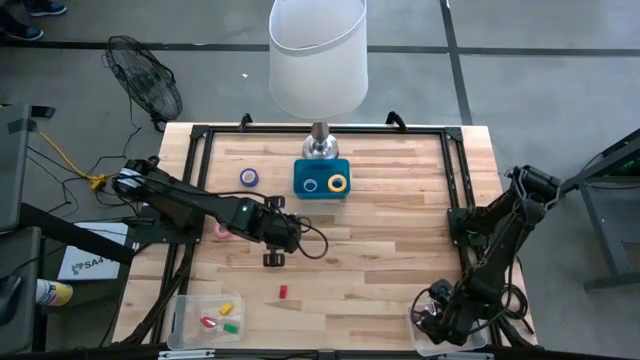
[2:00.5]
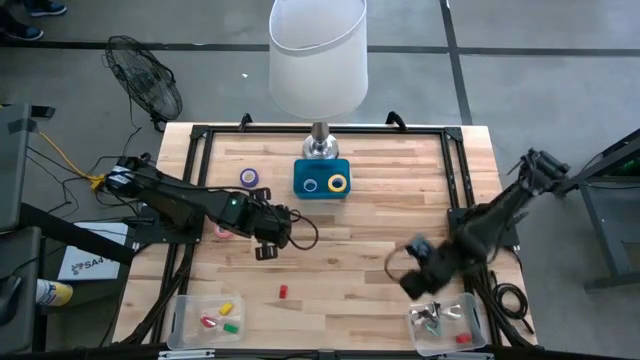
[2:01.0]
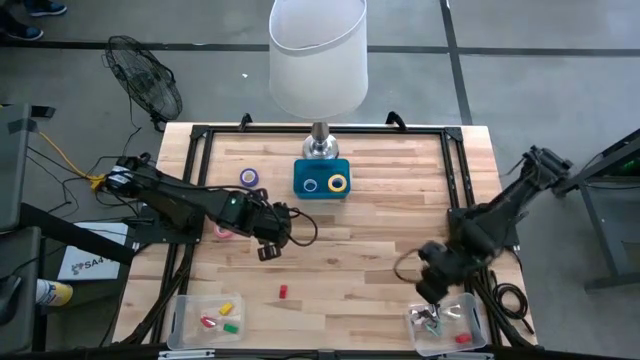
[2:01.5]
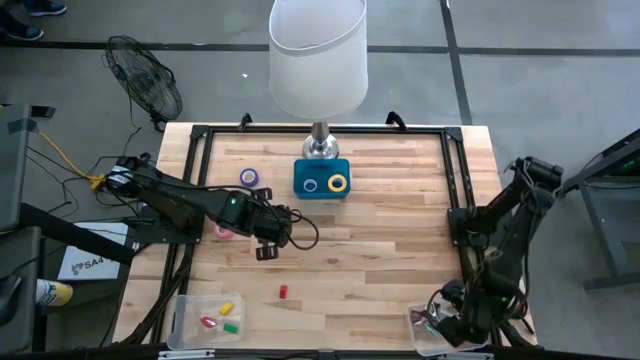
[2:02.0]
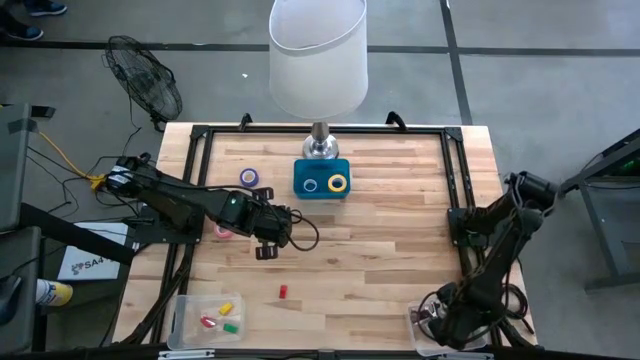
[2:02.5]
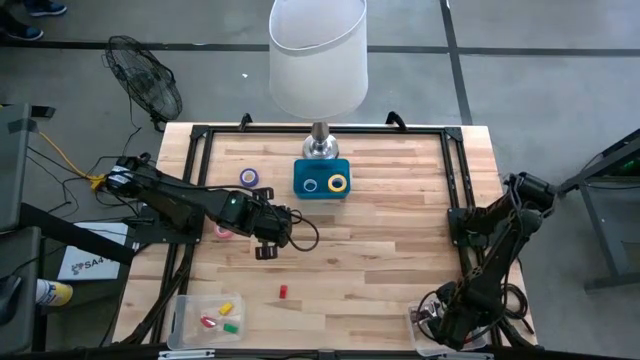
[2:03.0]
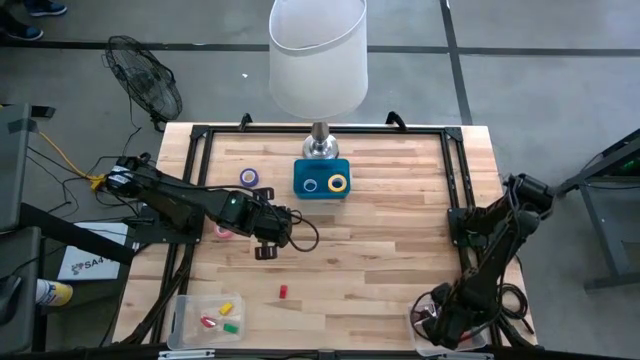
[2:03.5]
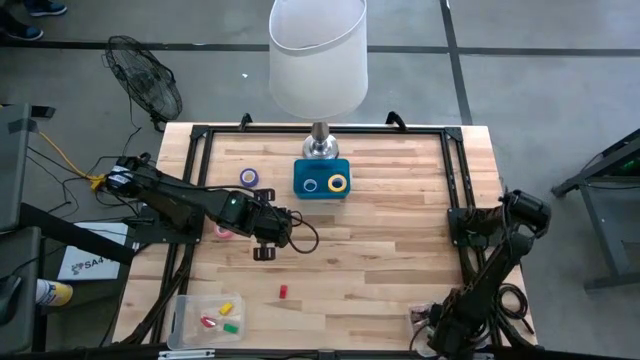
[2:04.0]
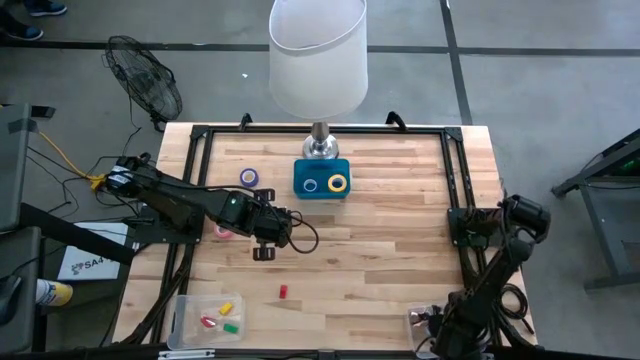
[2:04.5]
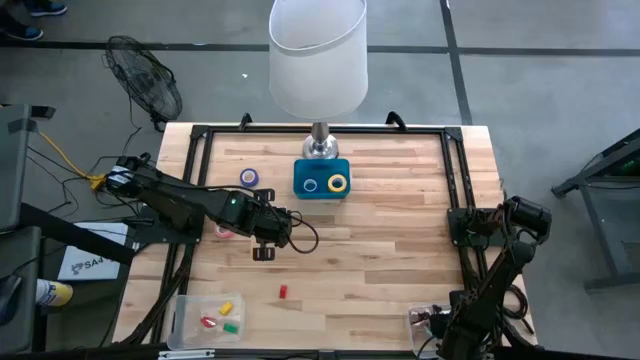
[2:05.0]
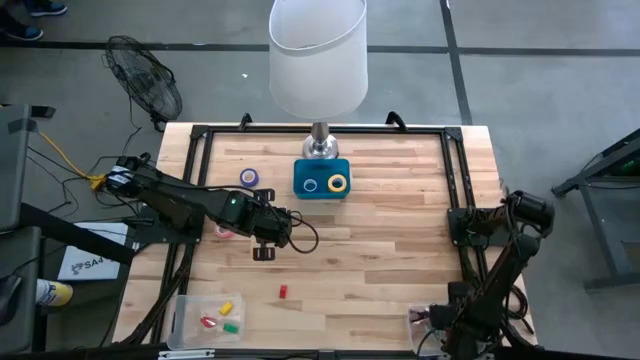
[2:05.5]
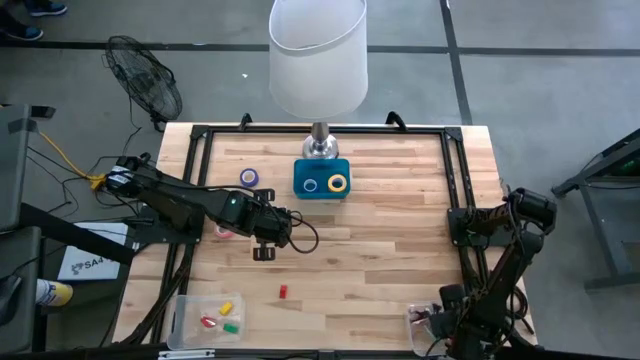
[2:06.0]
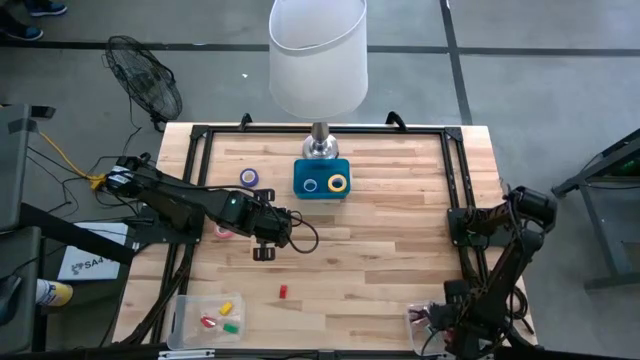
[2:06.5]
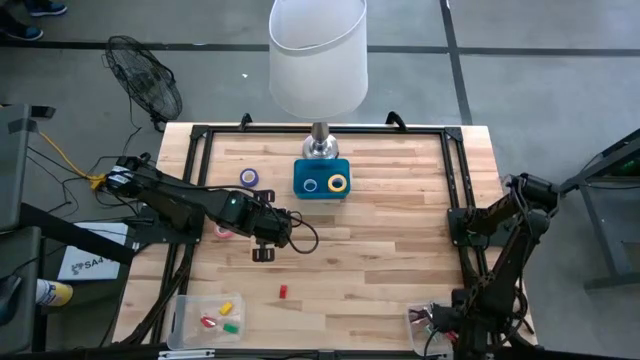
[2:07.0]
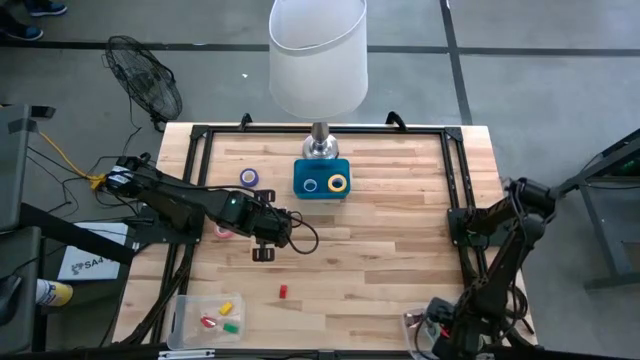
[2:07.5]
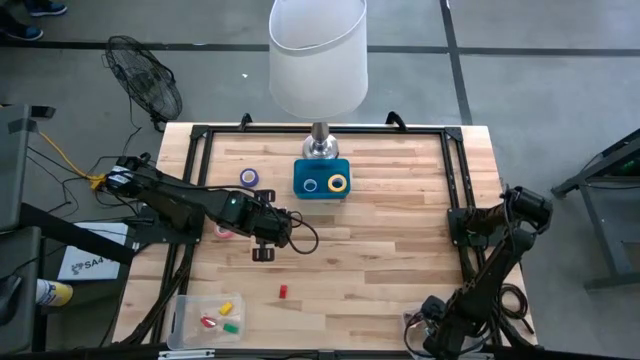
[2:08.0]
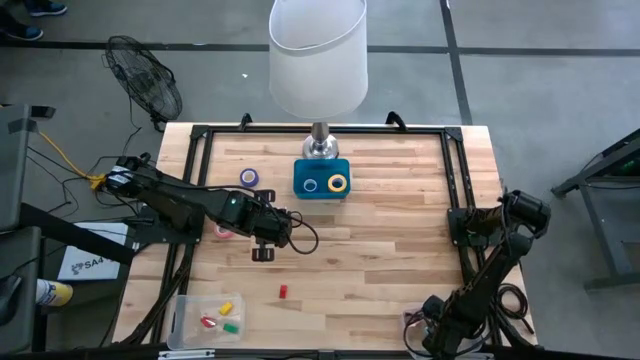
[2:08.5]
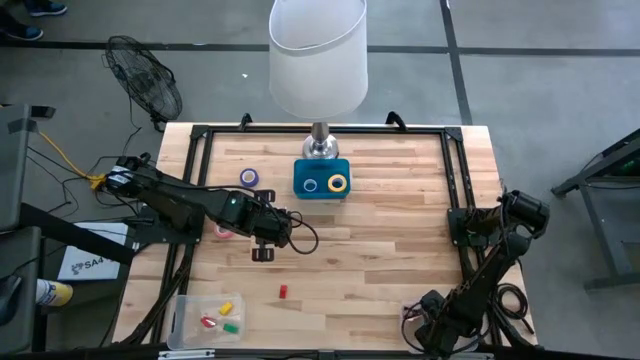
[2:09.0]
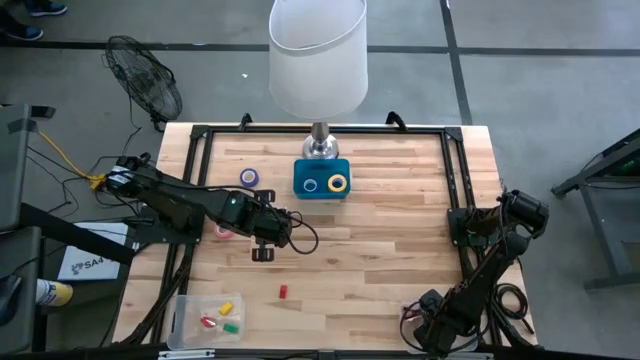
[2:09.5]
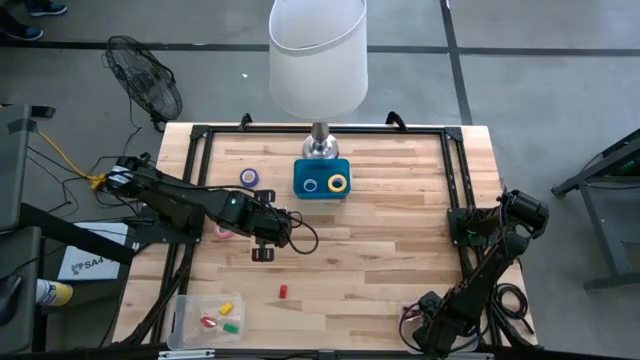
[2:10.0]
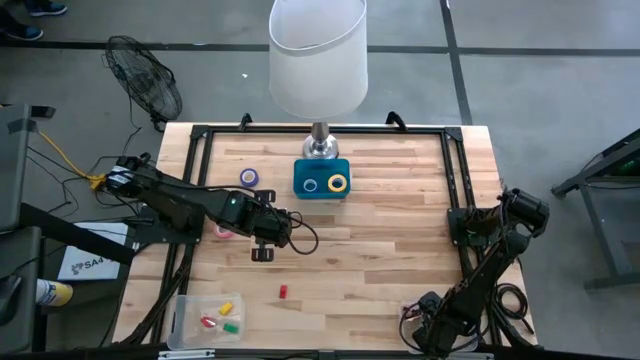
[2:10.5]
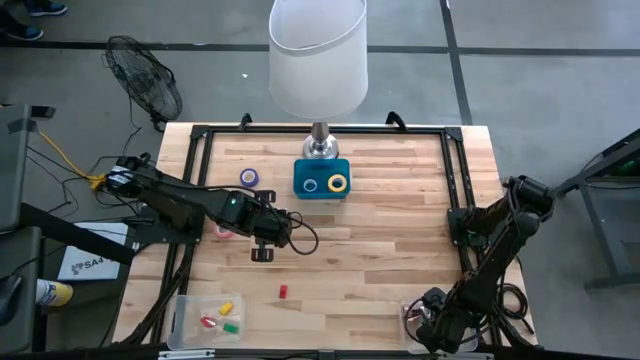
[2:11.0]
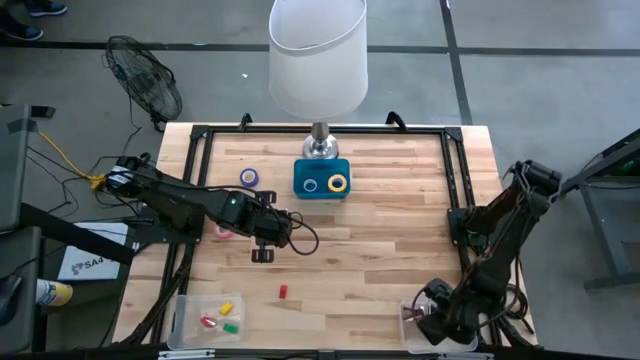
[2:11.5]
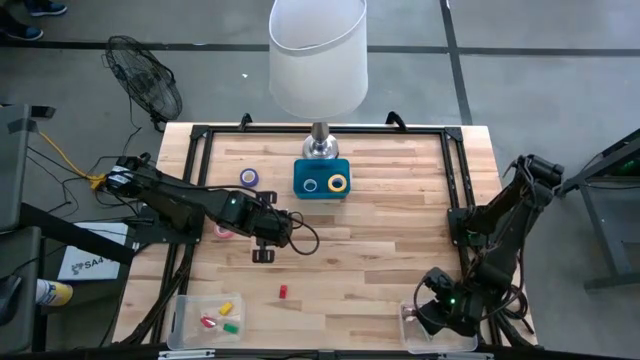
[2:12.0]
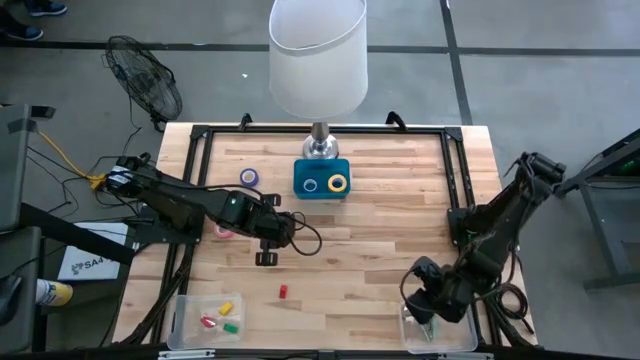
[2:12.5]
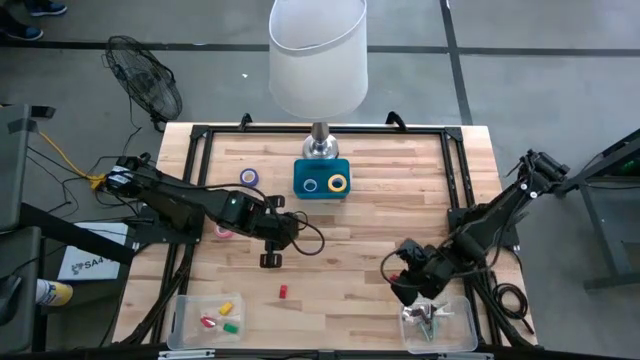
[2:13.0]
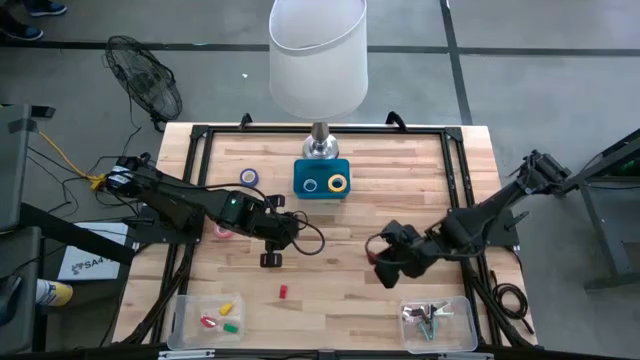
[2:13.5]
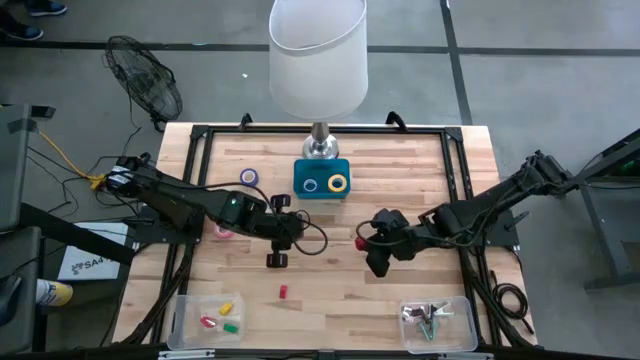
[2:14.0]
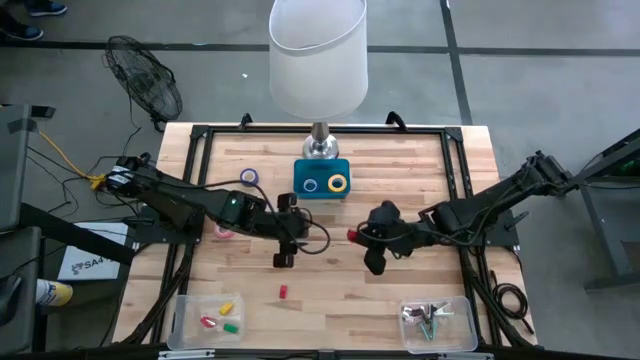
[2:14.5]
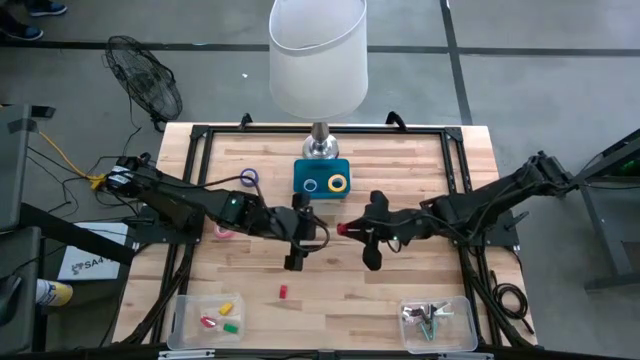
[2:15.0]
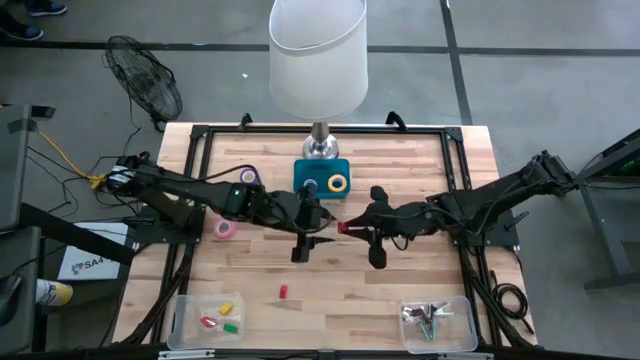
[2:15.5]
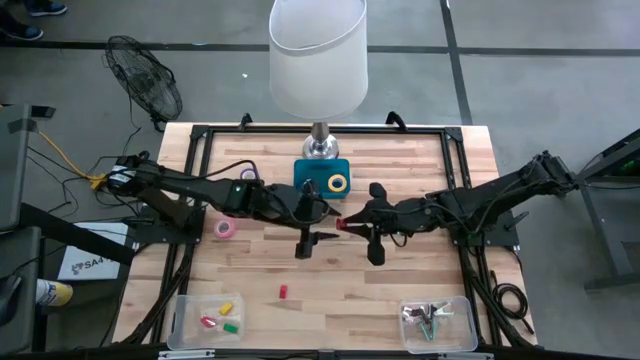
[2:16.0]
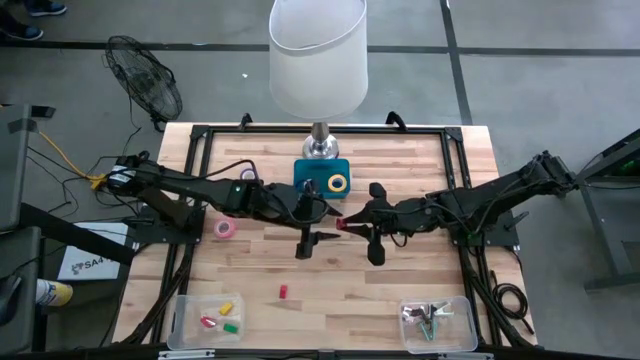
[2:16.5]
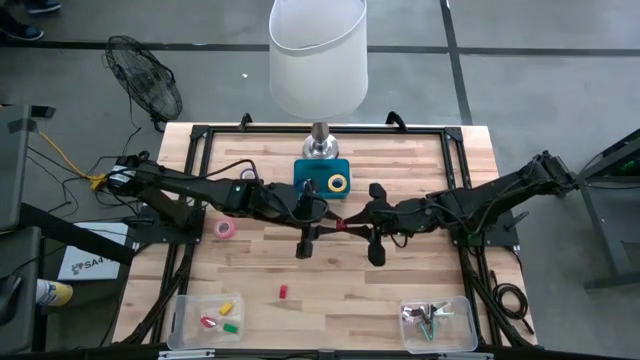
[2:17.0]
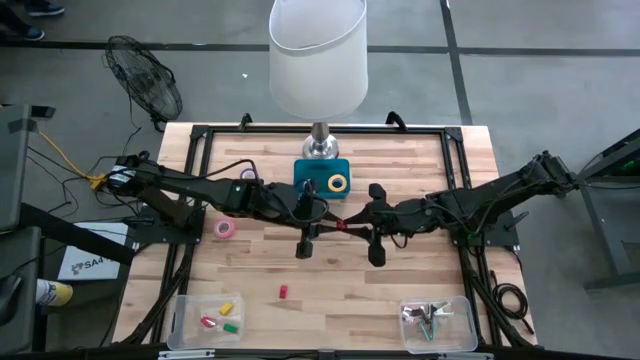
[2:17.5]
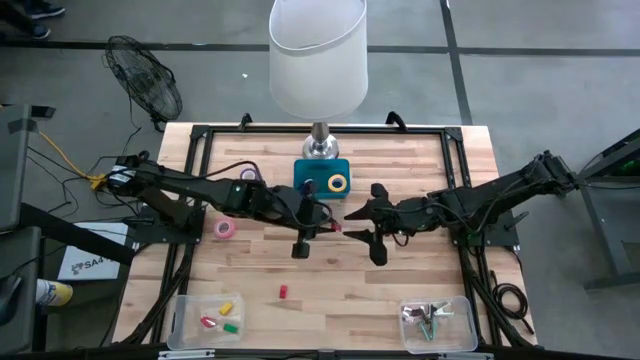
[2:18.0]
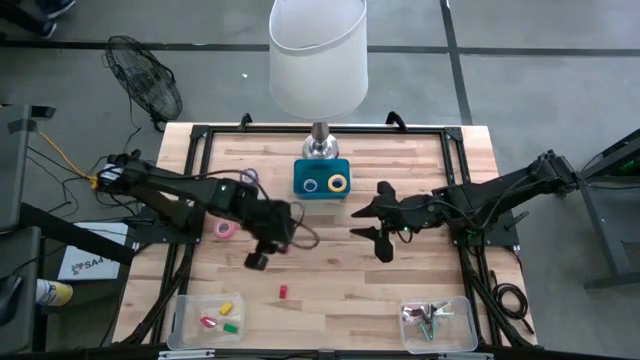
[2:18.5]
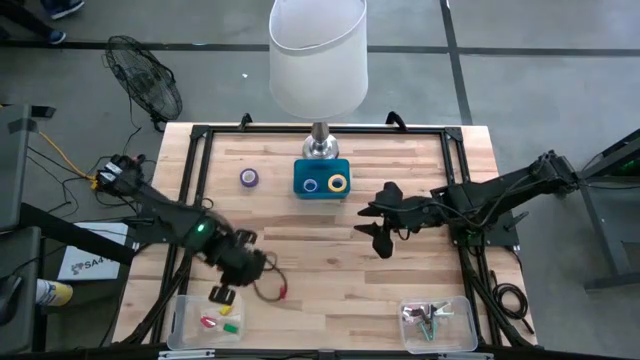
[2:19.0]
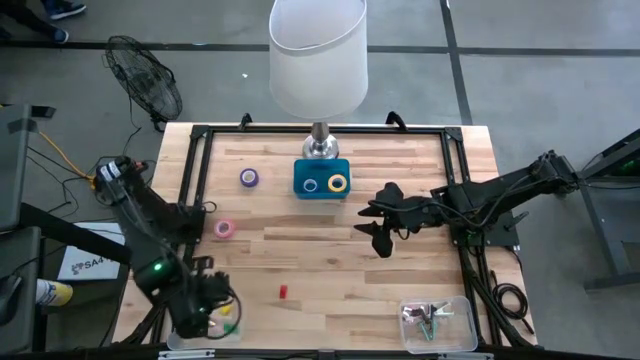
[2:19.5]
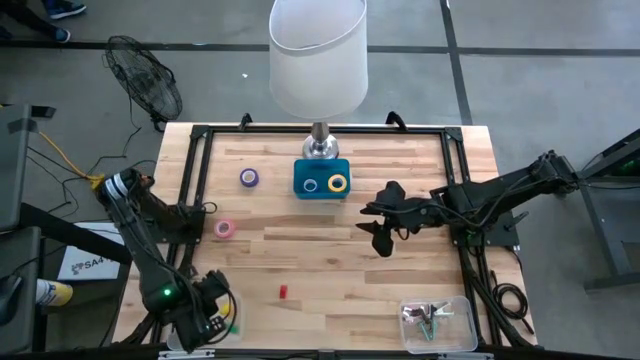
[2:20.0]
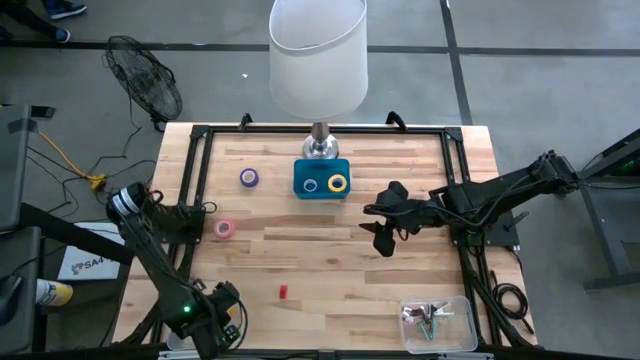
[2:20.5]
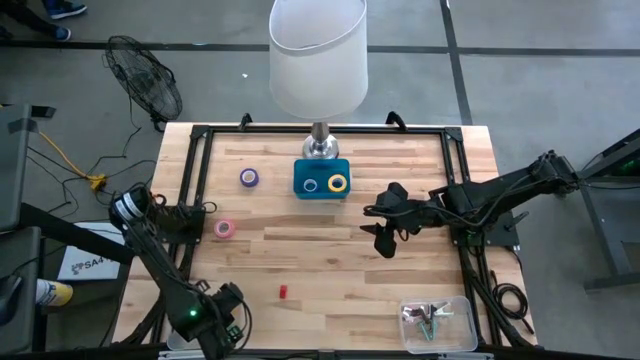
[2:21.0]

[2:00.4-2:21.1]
Task: Pick and place Stapler, Stapler remover, tape
Put the top red stapler into the left transparent bin
